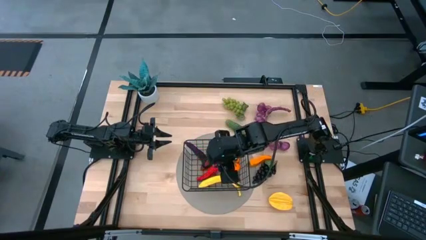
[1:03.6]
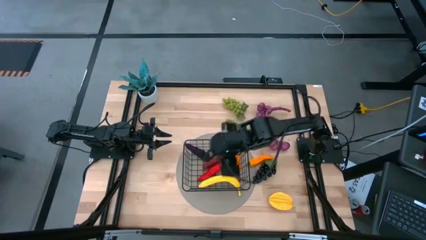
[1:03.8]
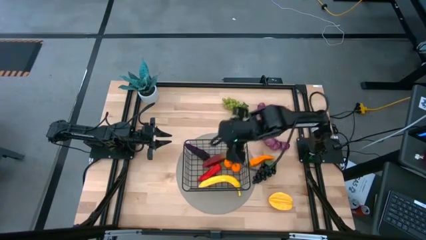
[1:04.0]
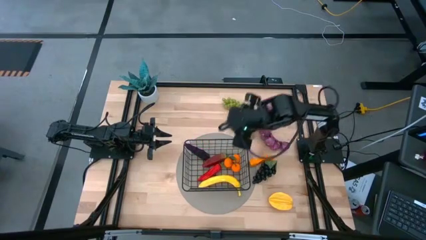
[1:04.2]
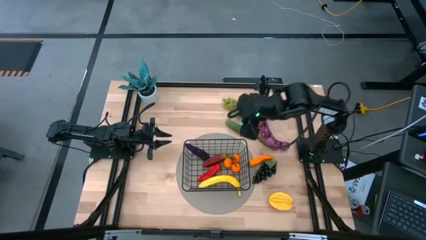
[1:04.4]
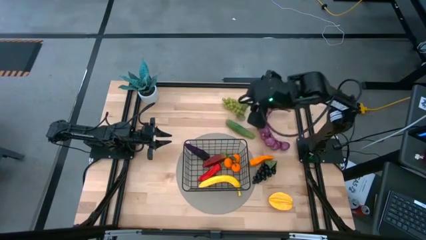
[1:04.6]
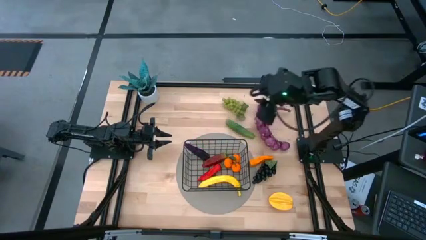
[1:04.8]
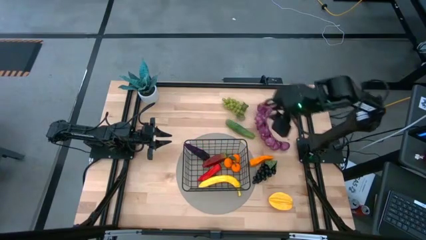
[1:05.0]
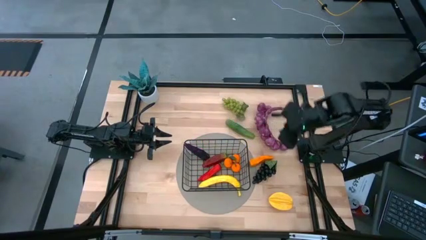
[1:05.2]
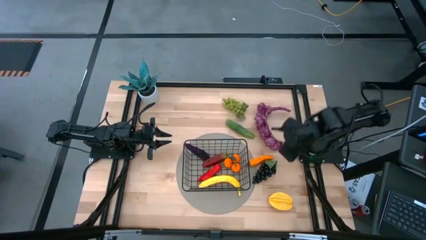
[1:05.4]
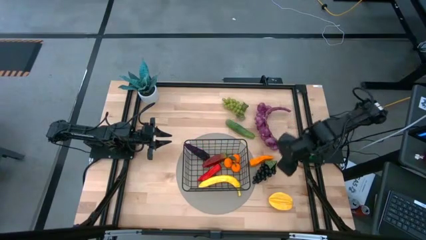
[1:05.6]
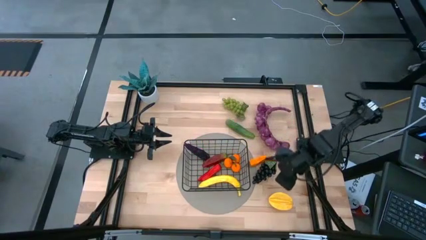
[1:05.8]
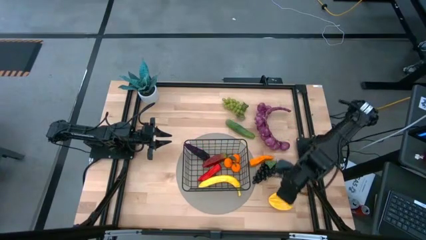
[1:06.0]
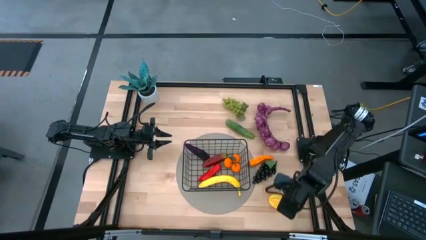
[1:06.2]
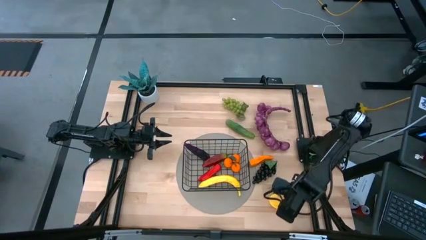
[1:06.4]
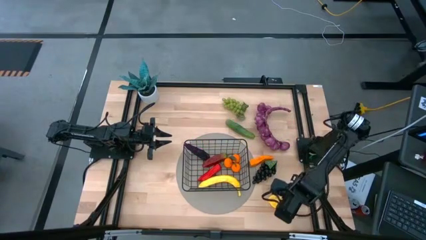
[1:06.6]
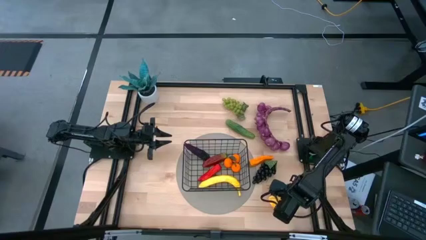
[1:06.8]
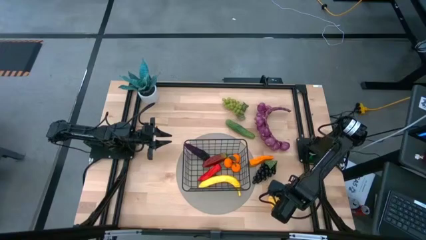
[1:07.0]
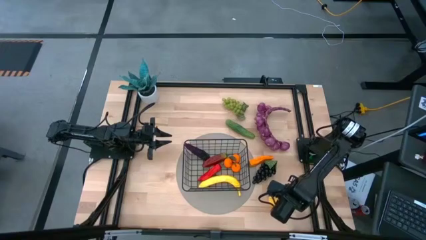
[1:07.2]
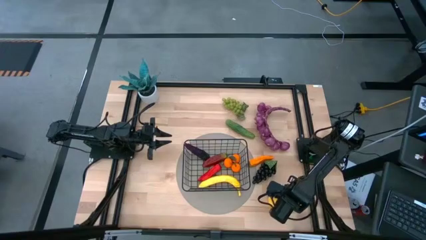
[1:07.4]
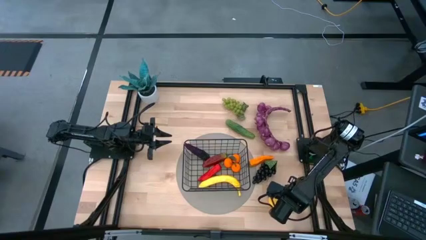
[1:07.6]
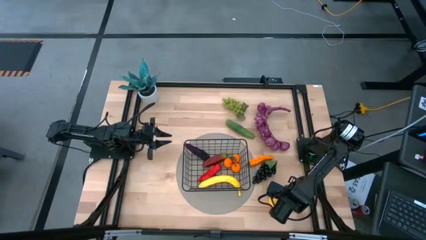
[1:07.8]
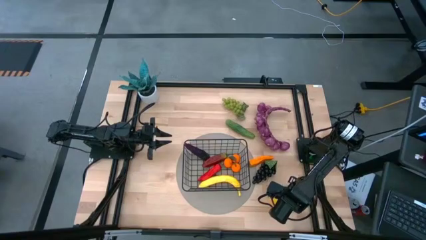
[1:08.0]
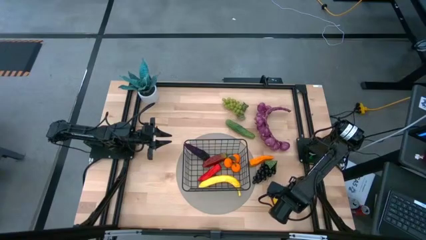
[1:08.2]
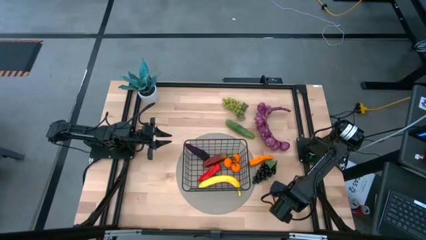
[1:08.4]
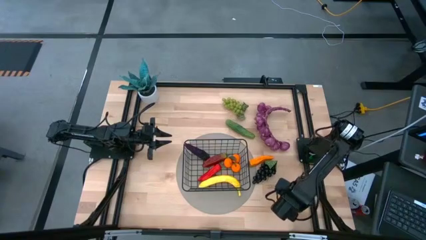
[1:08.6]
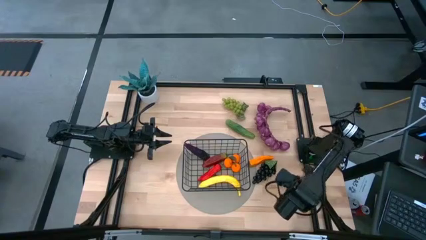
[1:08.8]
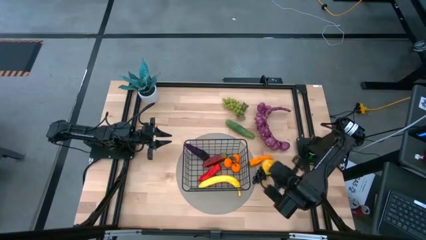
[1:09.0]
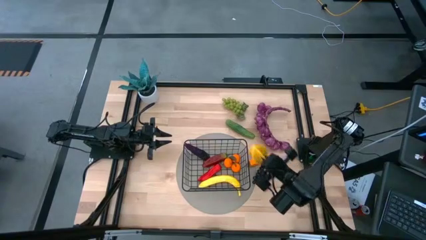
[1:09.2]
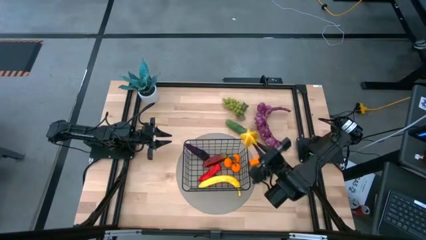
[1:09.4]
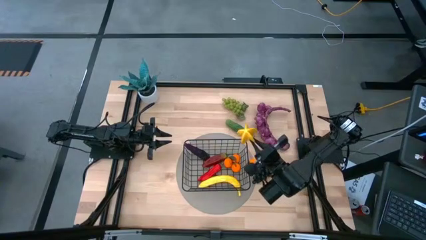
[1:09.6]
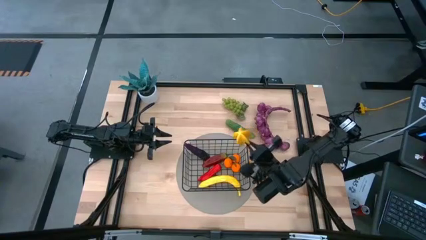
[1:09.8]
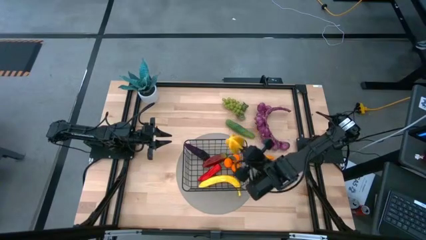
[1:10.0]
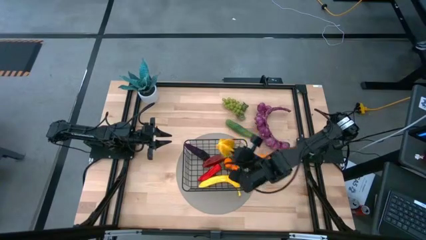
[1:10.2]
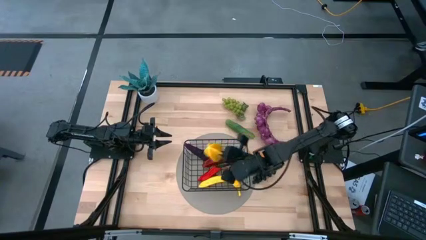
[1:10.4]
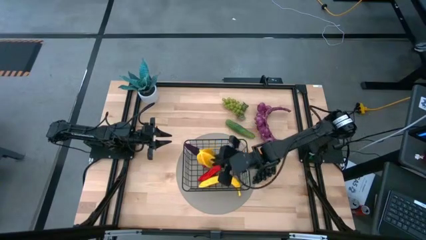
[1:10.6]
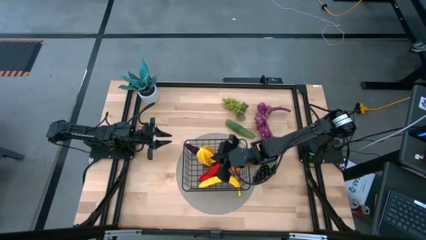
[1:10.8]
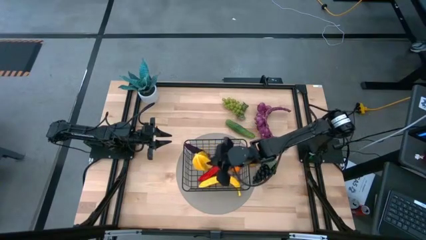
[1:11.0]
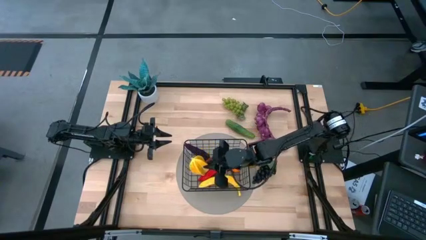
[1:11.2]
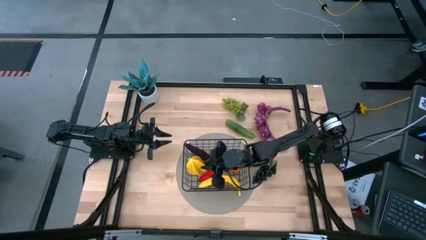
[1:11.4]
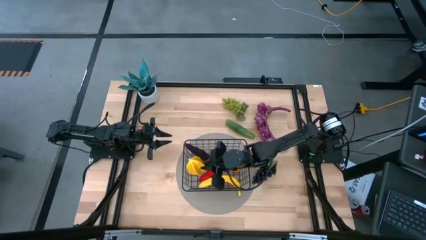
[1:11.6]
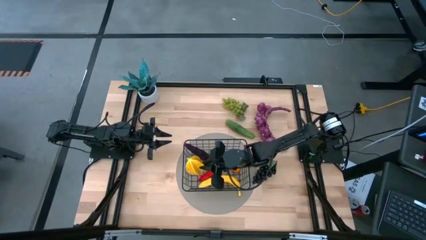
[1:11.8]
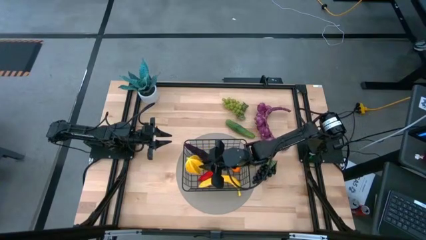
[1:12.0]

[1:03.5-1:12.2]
Task: Build produce basket
Put the yellow starfruit into the black wire basket

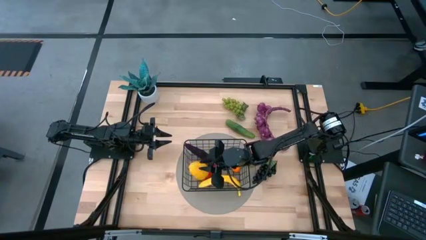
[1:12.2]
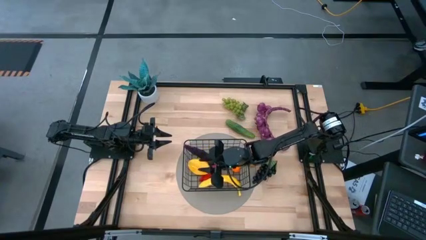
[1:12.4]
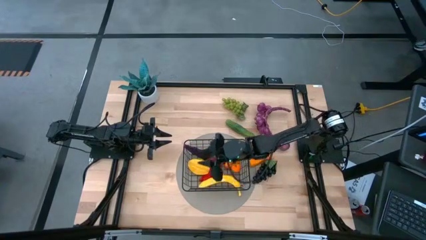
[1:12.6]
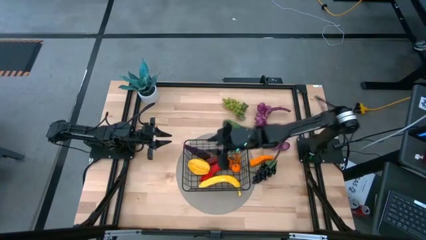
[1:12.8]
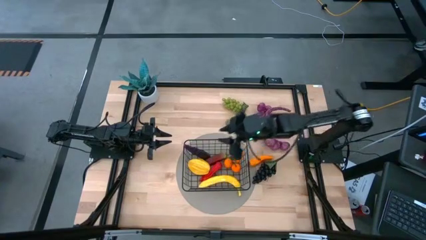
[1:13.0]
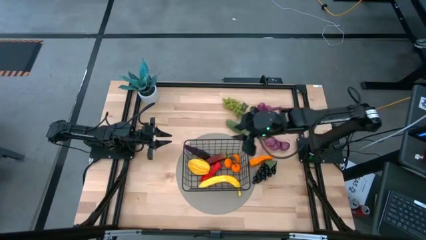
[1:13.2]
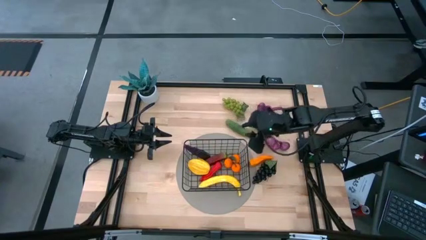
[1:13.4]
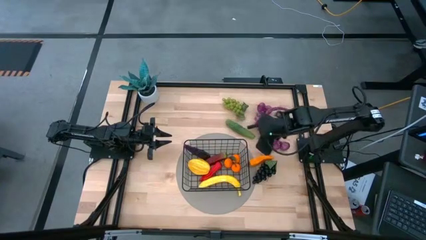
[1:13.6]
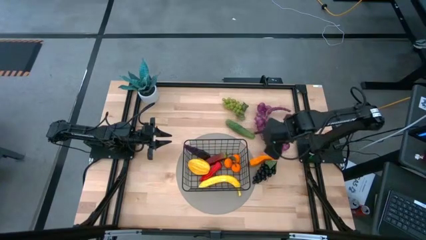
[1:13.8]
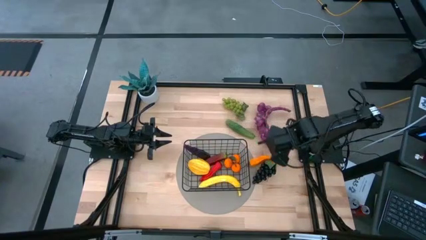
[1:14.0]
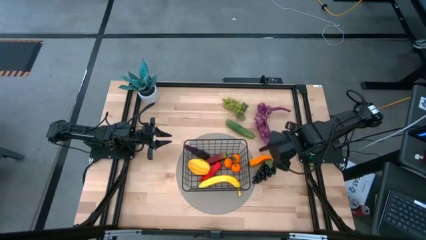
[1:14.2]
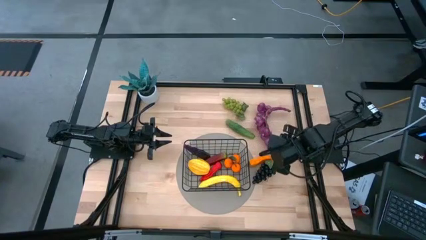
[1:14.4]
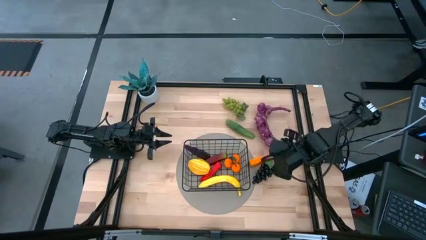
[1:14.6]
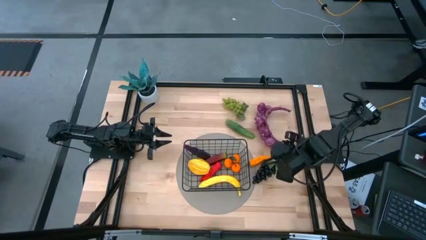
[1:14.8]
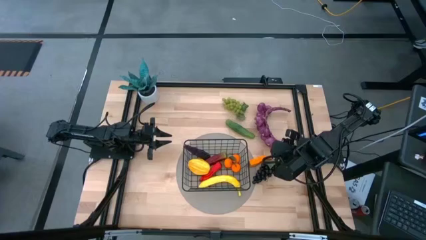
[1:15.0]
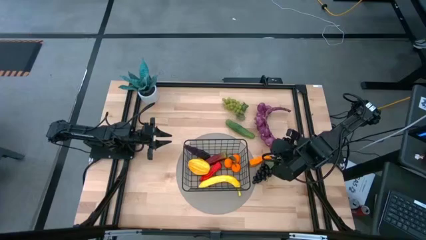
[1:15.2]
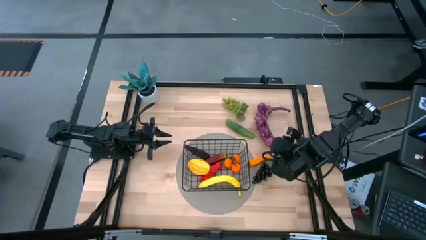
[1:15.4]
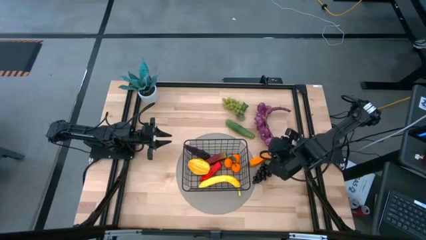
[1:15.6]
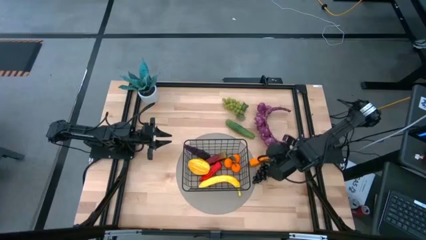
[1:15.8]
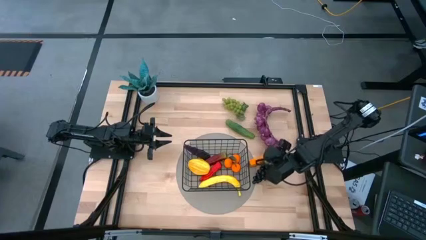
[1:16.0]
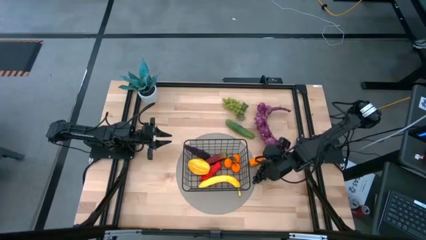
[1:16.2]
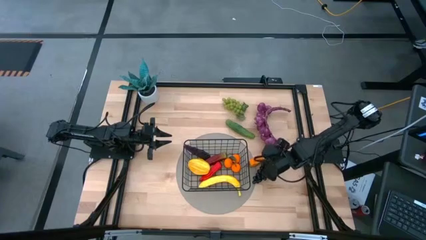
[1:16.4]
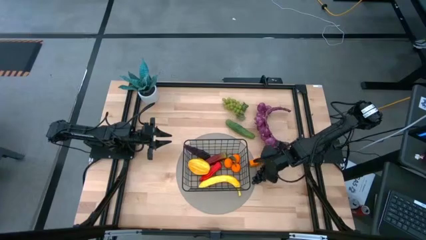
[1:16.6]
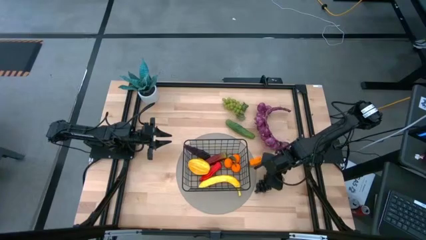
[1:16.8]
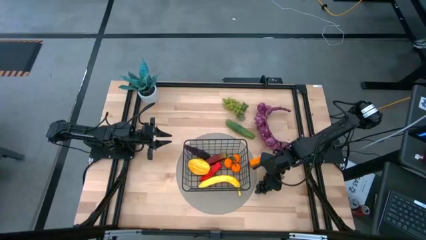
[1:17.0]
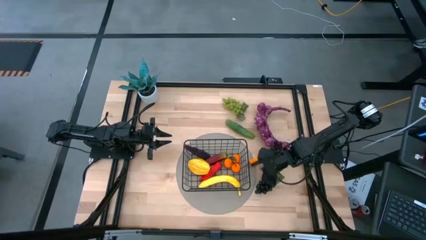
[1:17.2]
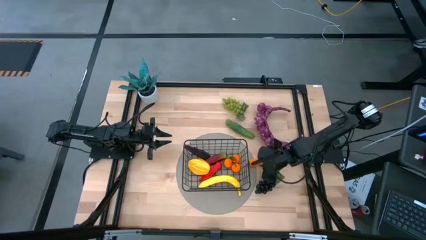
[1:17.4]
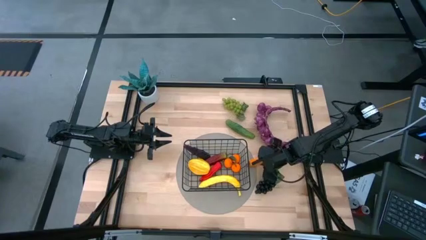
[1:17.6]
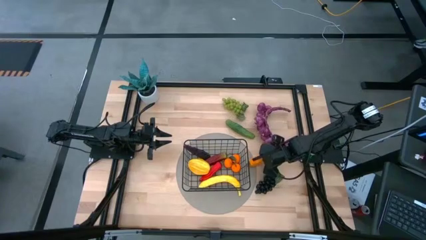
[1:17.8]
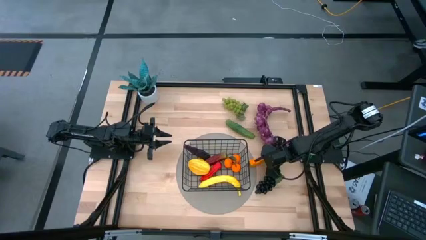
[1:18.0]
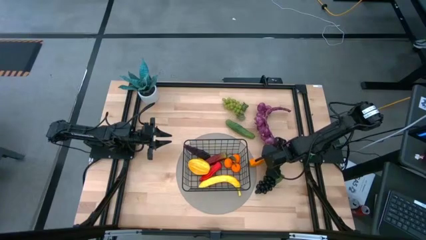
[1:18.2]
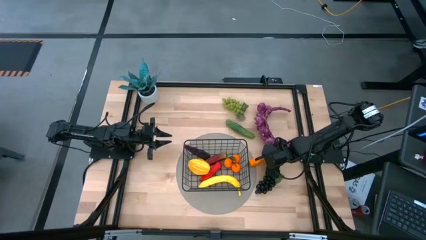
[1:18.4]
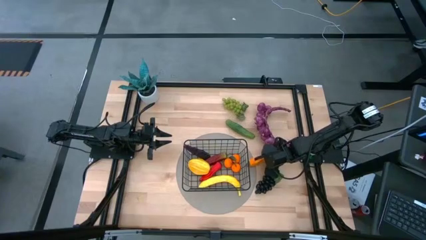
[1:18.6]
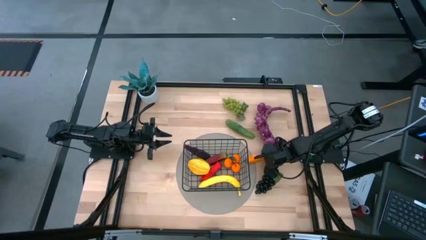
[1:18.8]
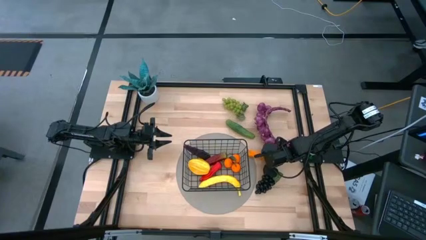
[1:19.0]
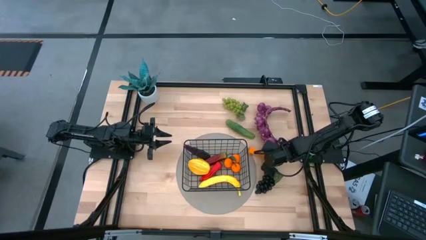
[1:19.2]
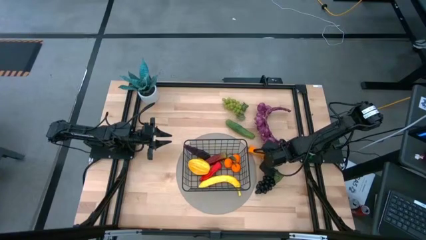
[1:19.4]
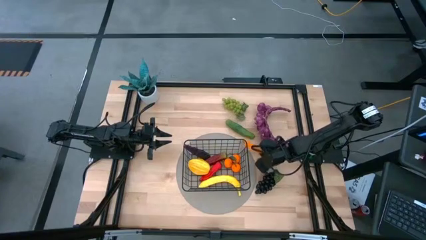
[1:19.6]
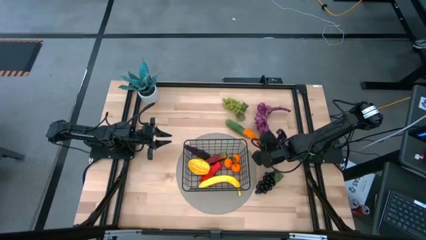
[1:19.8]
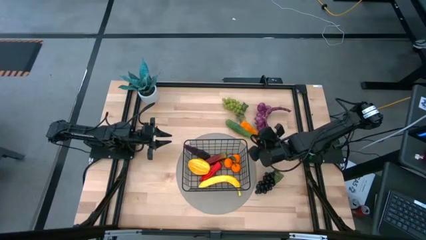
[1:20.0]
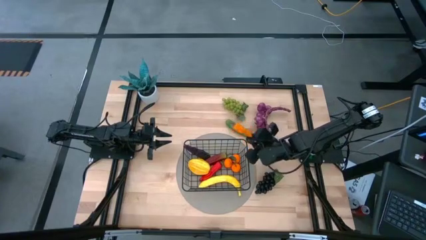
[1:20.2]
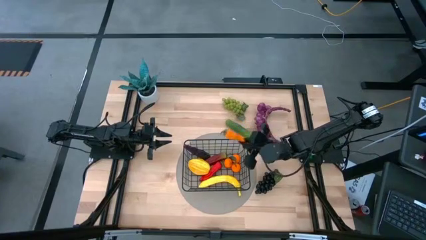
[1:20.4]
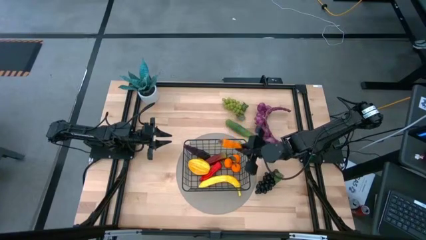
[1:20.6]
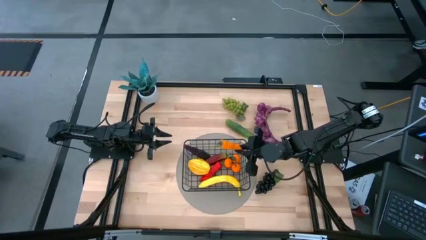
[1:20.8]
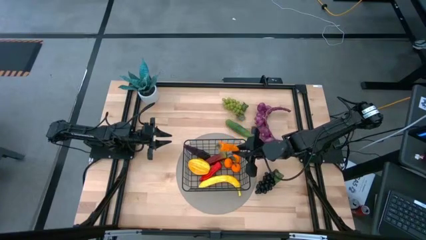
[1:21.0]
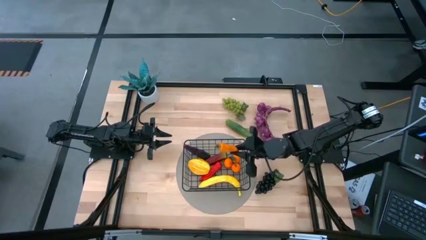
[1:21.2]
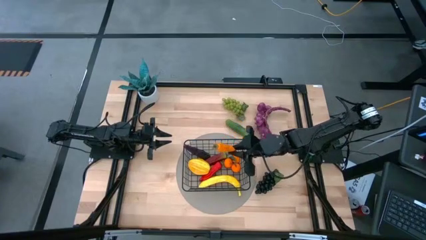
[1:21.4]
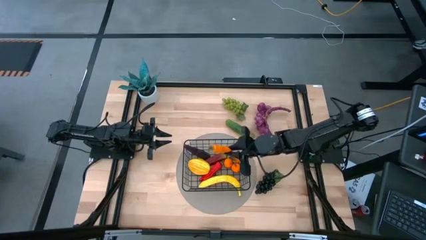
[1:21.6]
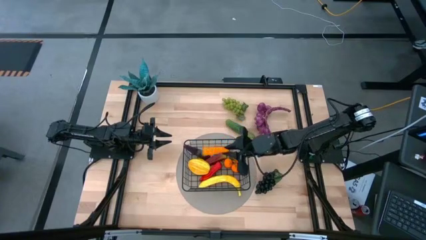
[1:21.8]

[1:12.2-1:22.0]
Put the orange chili pepper into the black wire basket
